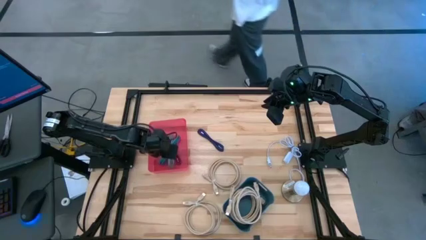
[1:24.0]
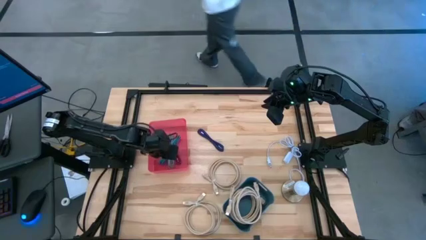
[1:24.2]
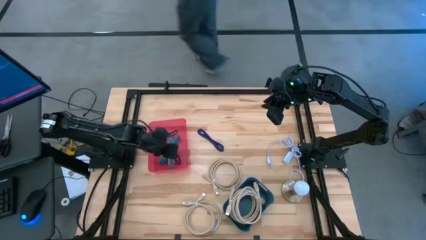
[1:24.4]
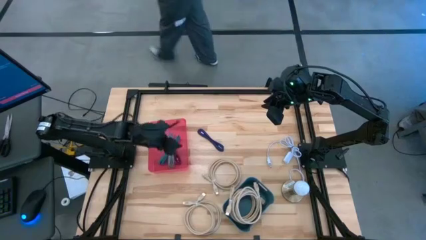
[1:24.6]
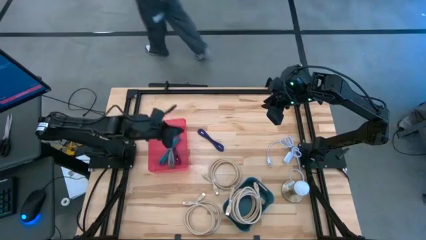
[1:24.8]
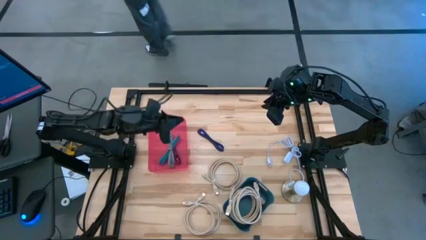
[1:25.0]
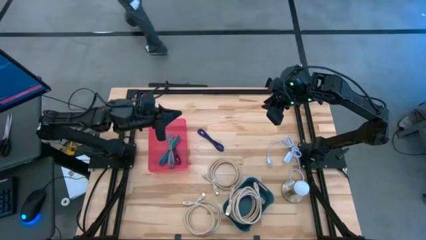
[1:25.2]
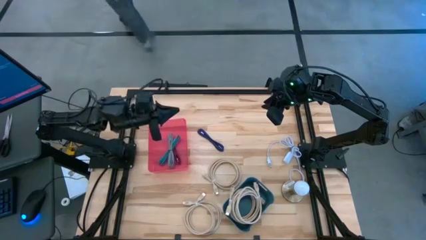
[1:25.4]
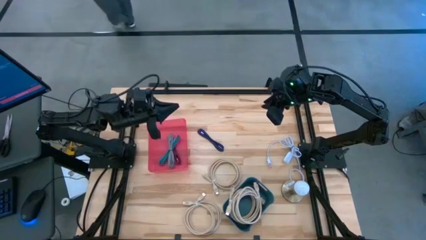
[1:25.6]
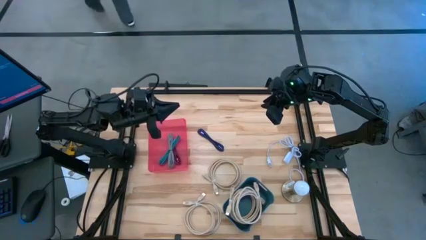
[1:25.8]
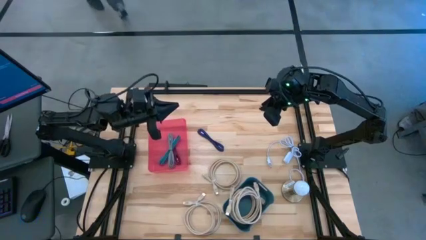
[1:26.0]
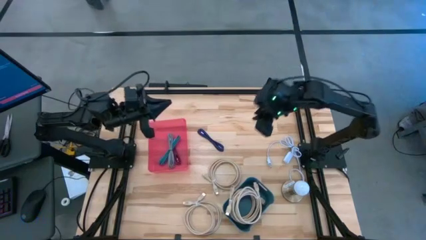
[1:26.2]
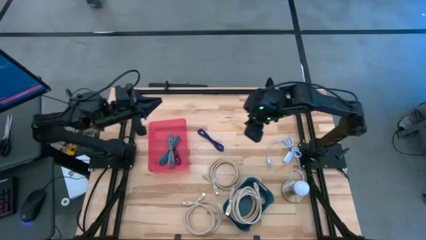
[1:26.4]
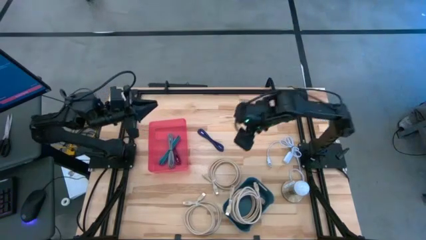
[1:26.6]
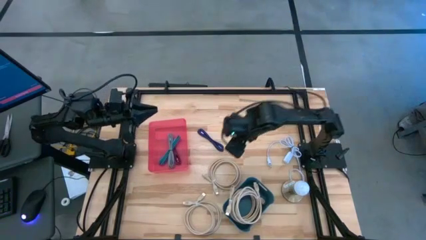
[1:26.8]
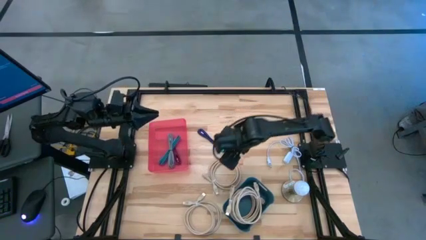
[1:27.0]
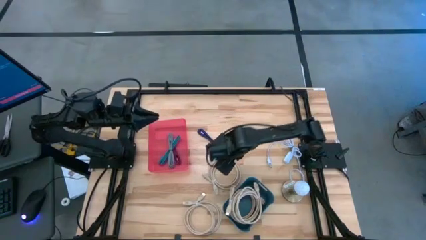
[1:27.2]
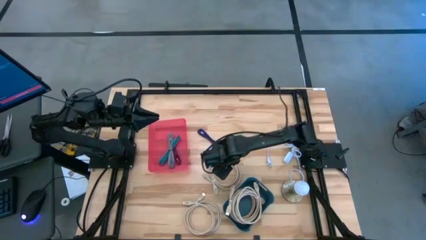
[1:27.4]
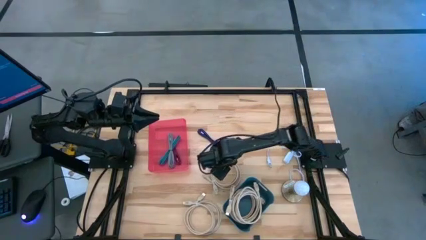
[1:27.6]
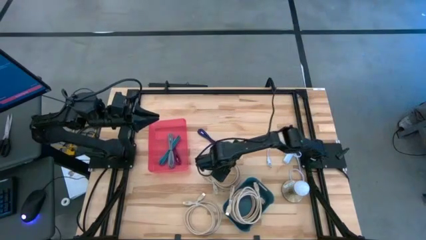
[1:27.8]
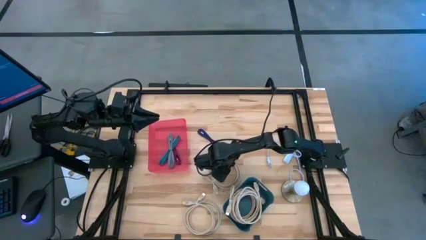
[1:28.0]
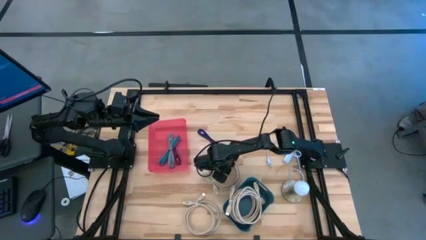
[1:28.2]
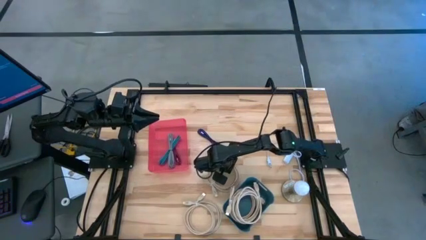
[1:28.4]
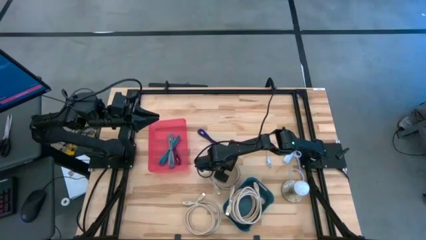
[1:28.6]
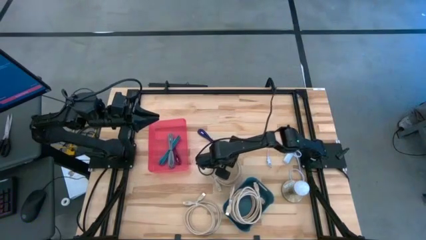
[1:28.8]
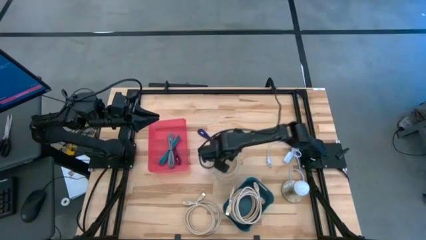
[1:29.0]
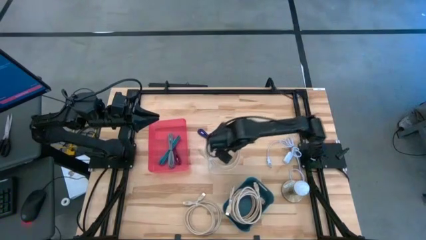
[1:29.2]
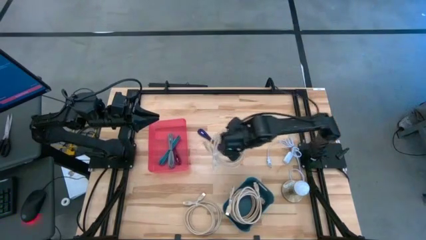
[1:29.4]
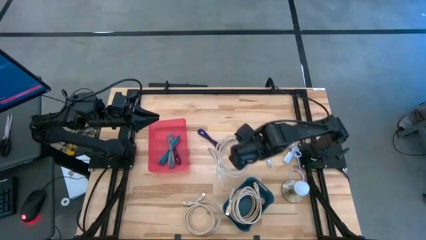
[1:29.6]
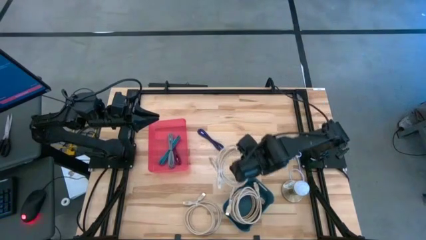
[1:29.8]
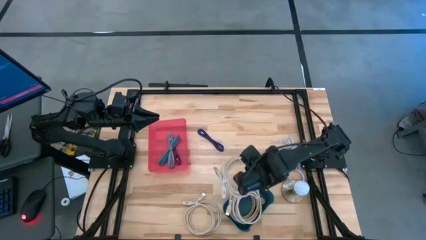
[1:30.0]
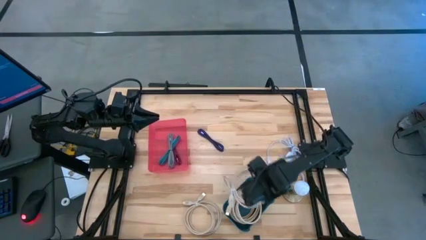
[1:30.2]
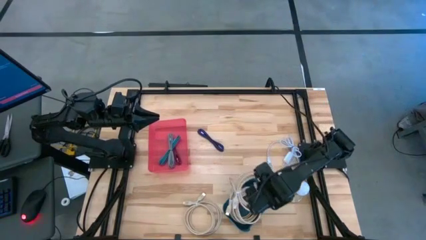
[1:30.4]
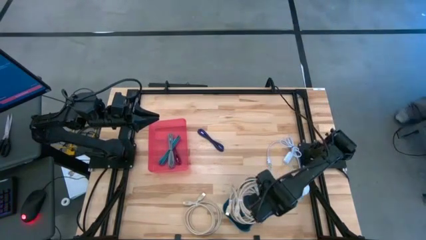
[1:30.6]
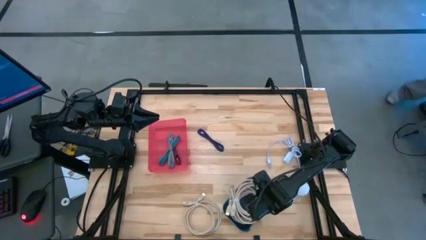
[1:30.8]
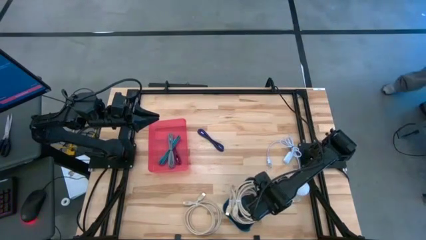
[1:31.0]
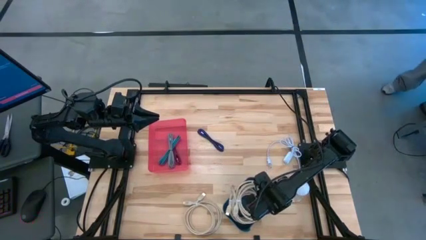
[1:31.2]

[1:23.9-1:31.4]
Task: Pick & Place USB Port
Put the white HDMI cable into the blue bin

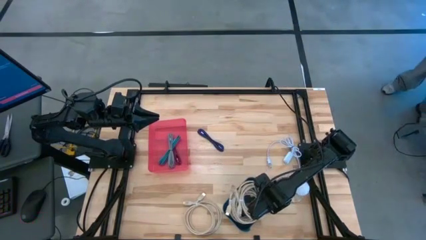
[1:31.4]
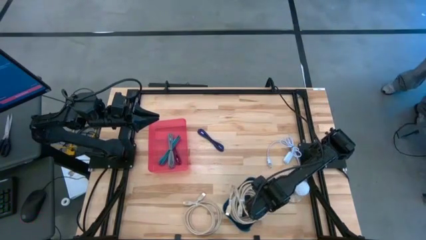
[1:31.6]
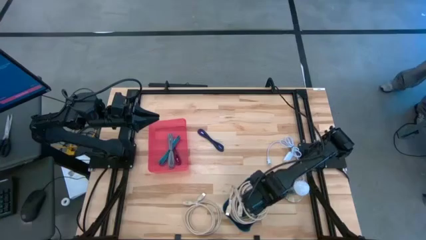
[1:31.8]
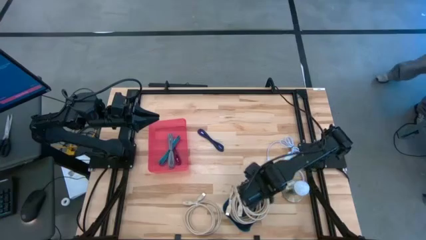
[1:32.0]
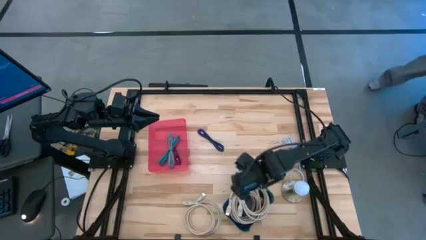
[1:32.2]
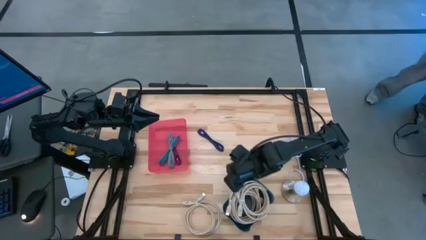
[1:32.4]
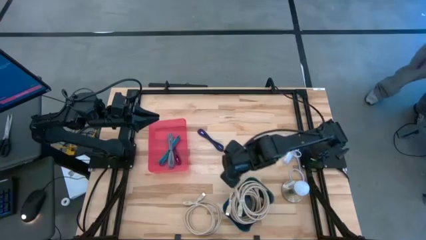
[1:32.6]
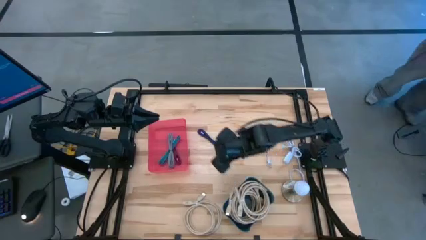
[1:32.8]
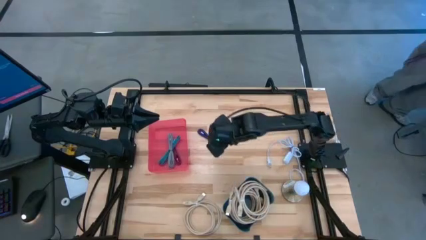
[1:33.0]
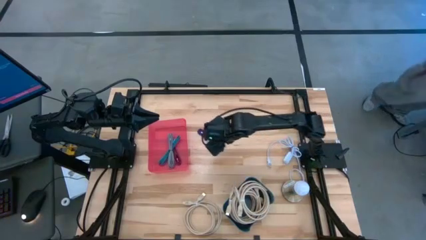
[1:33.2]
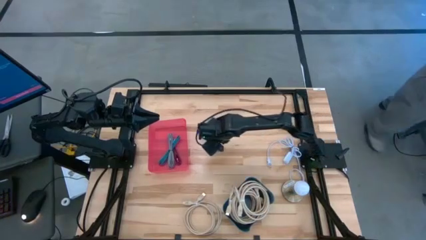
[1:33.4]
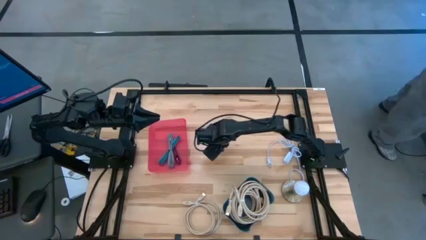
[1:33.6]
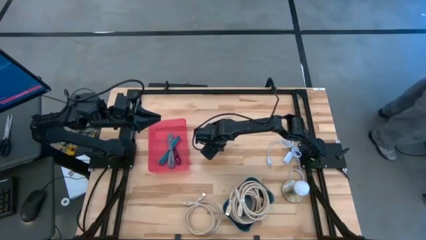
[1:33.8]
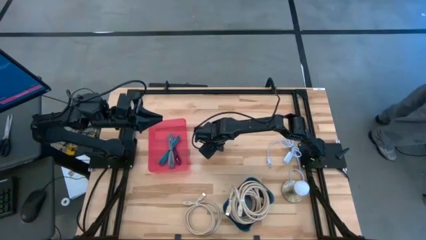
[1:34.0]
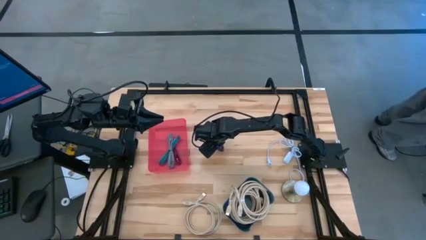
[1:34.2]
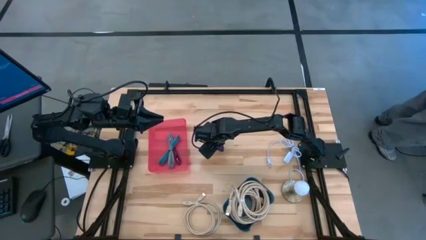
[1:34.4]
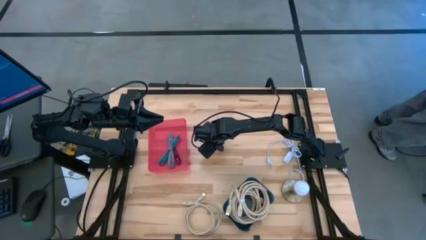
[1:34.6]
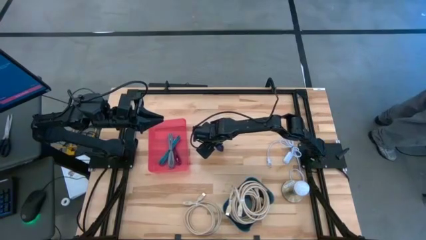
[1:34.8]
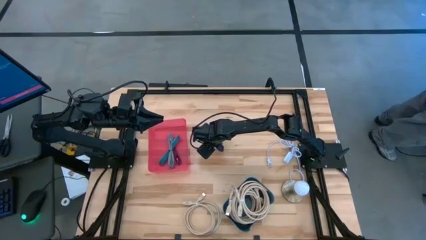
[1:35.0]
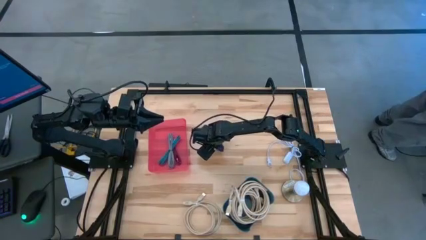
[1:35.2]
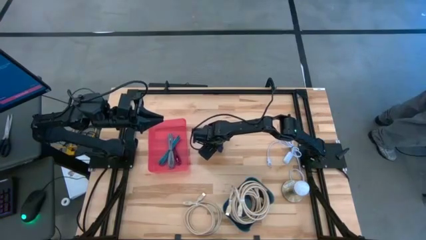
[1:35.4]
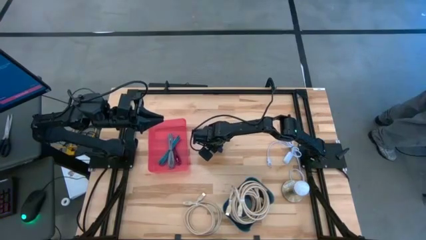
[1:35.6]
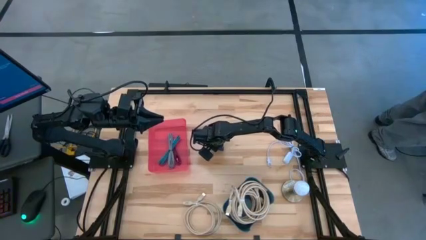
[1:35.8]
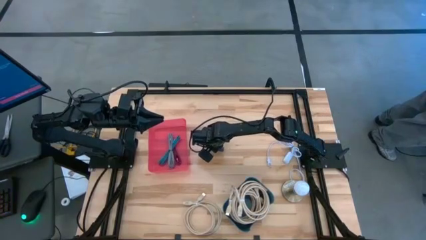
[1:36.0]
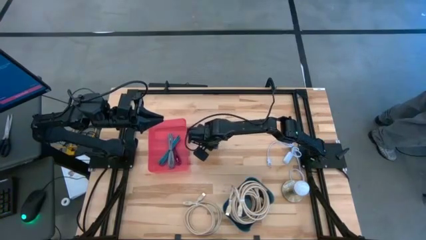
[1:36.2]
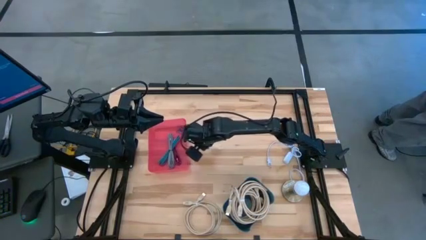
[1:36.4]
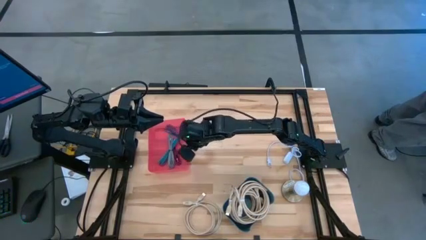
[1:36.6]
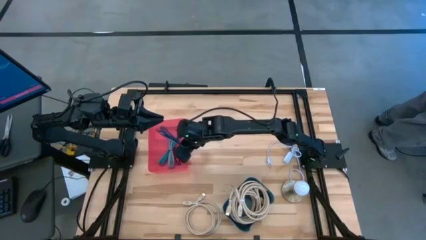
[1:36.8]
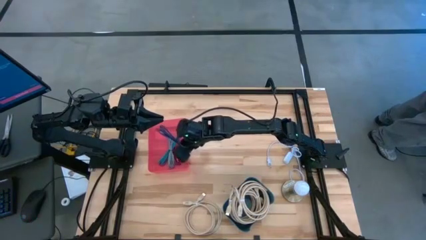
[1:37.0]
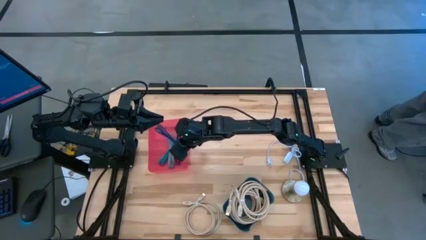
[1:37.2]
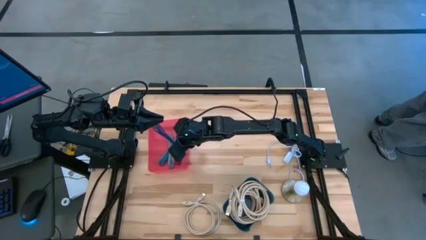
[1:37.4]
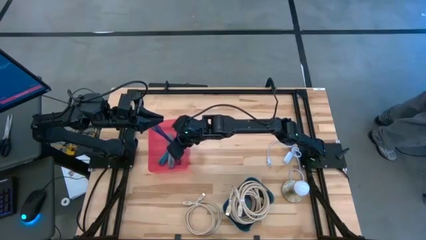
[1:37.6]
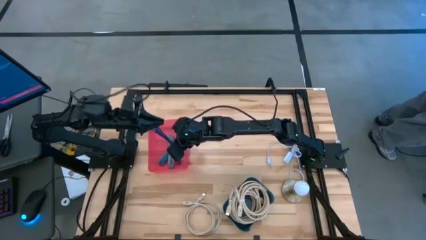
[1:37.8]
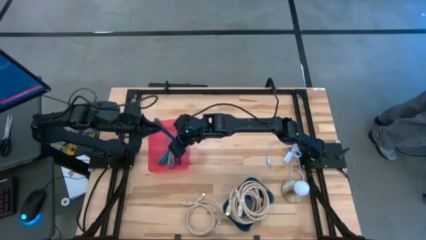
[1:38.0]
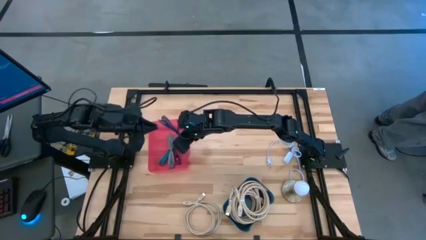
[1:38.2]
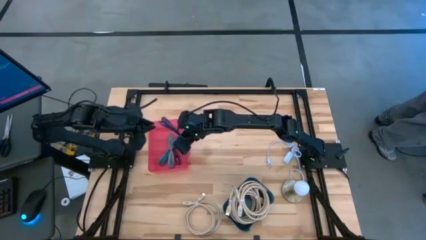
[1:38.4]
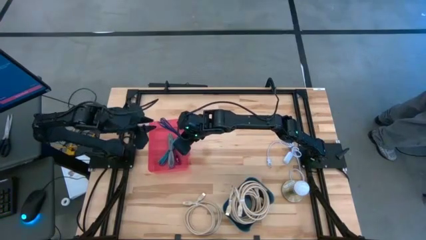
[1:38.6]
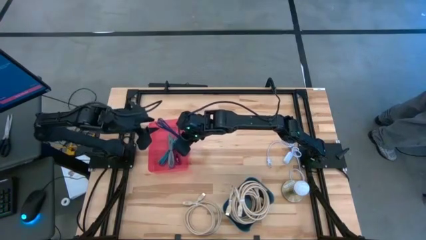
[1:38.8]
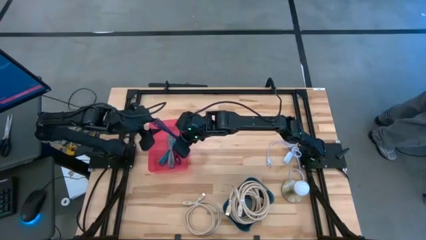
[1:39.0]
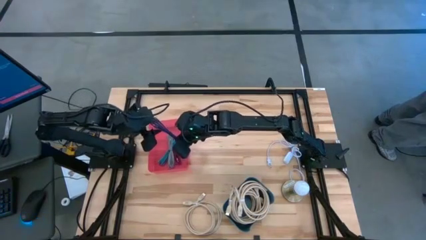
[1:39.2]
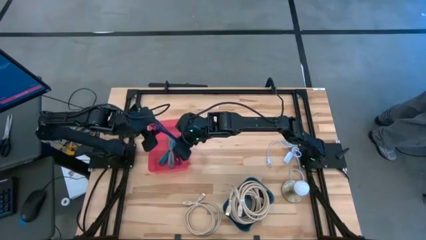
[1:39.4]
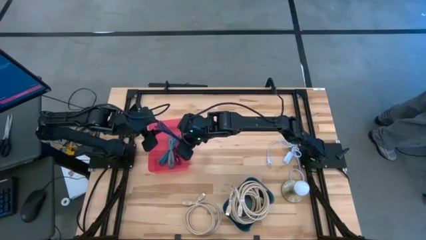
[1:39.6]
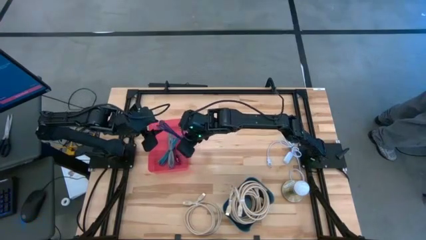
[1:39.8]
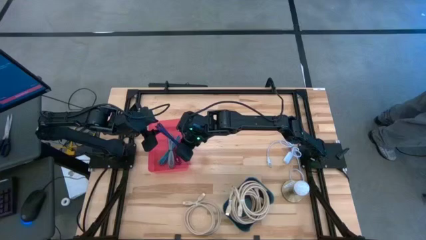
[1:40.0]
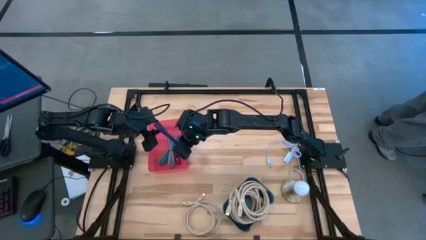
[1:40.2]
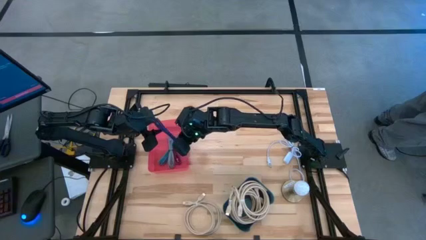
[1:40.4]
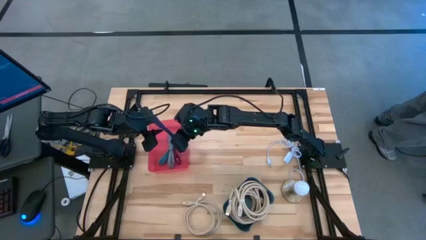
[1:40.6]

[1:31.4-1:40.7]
Put the purple charger cable into the red bin
